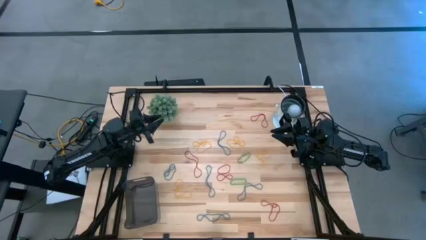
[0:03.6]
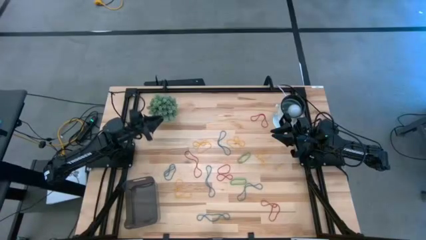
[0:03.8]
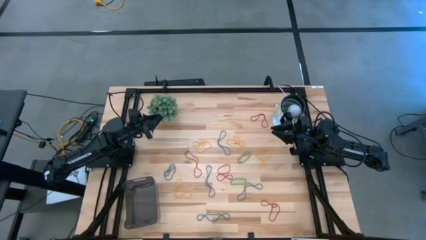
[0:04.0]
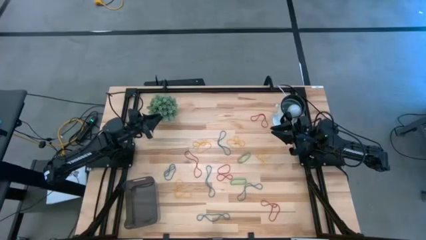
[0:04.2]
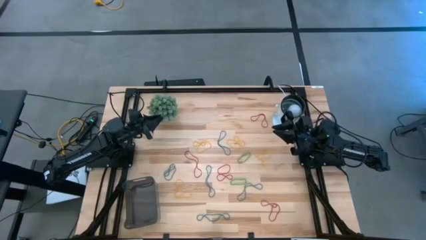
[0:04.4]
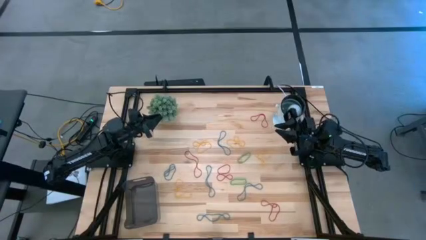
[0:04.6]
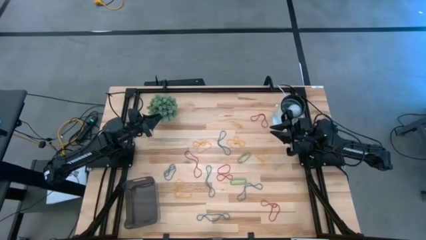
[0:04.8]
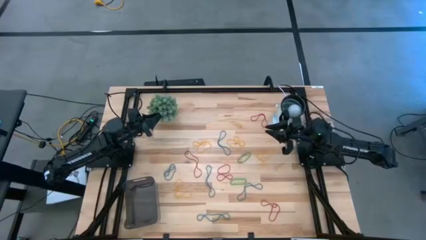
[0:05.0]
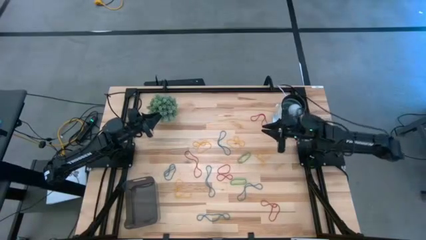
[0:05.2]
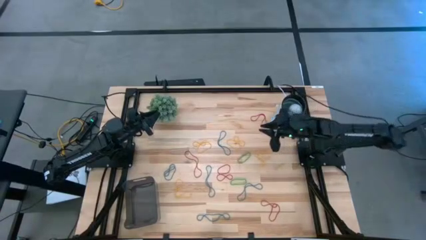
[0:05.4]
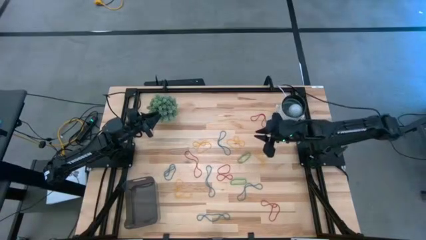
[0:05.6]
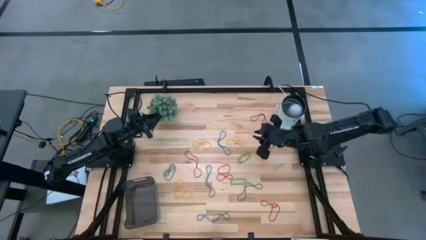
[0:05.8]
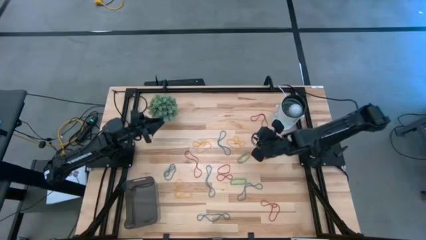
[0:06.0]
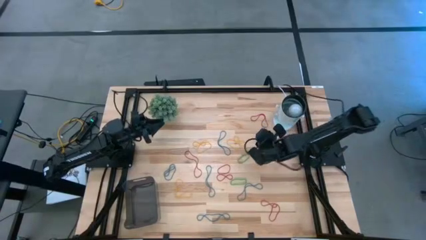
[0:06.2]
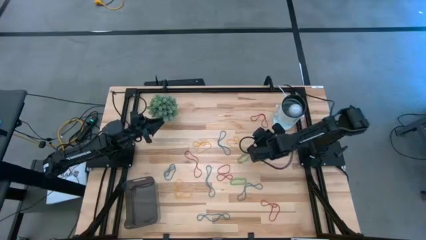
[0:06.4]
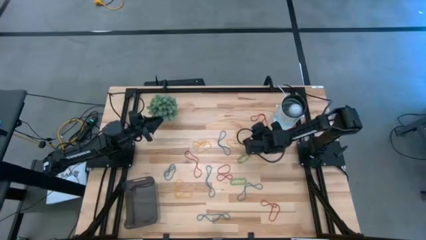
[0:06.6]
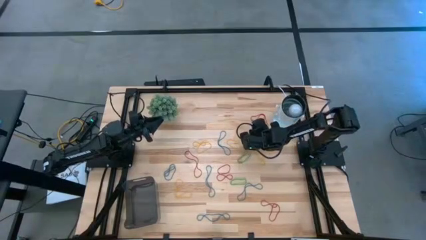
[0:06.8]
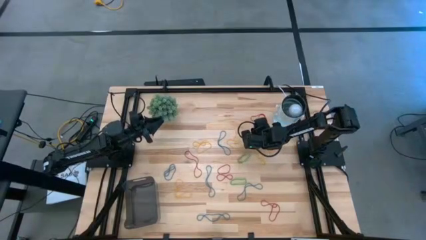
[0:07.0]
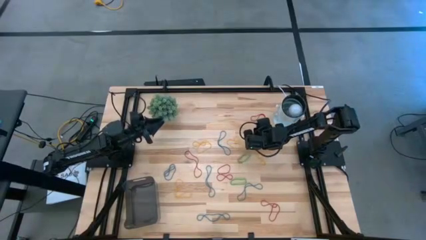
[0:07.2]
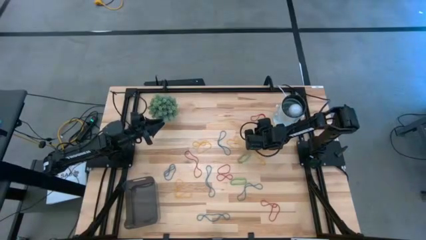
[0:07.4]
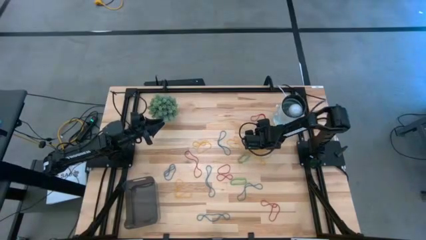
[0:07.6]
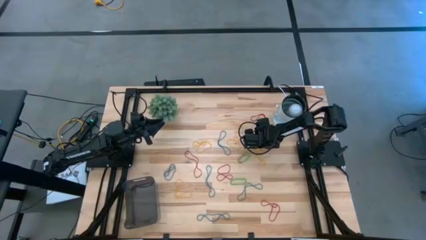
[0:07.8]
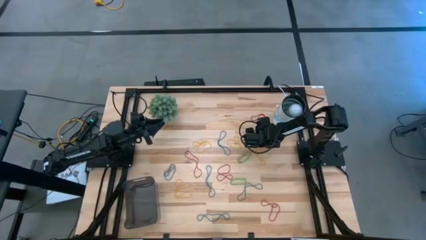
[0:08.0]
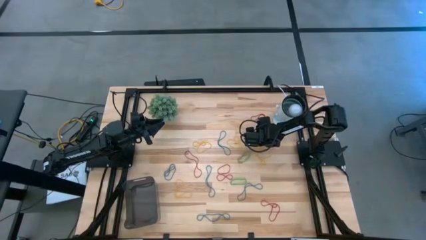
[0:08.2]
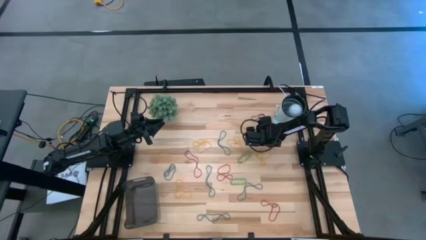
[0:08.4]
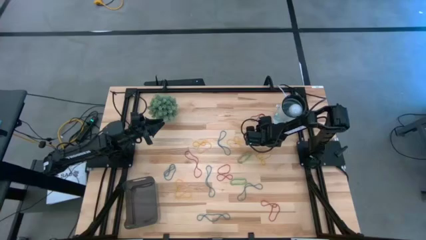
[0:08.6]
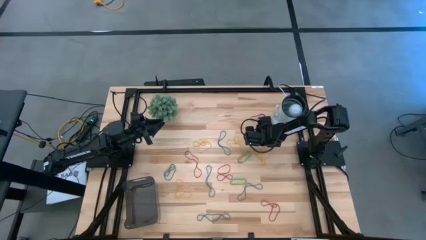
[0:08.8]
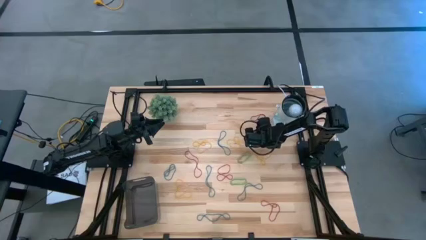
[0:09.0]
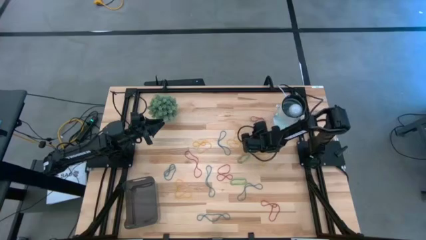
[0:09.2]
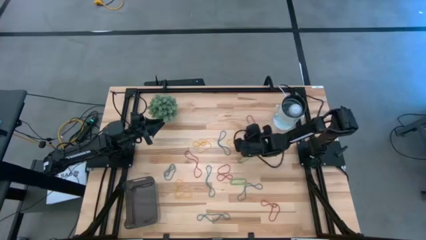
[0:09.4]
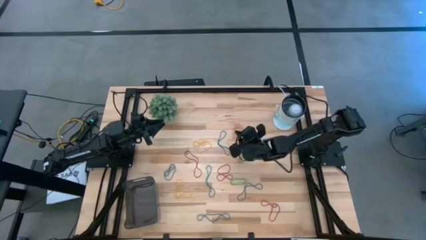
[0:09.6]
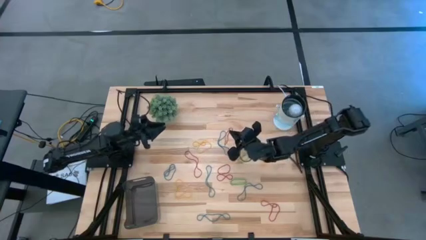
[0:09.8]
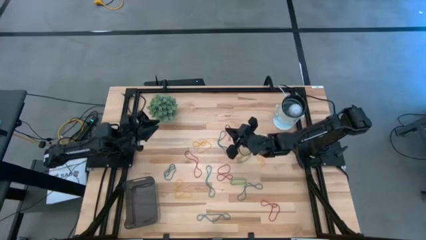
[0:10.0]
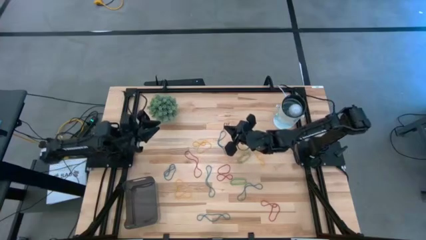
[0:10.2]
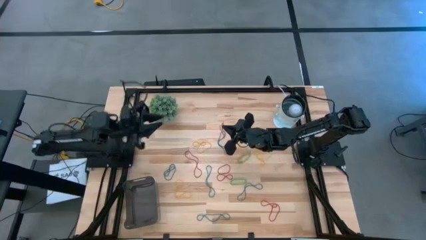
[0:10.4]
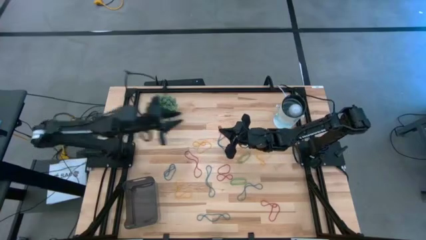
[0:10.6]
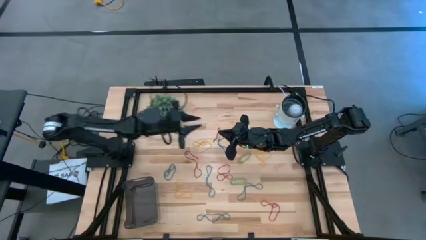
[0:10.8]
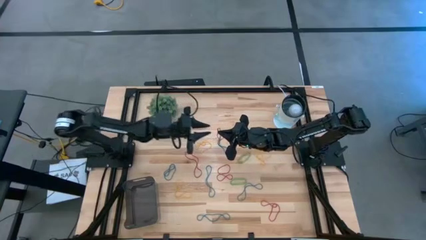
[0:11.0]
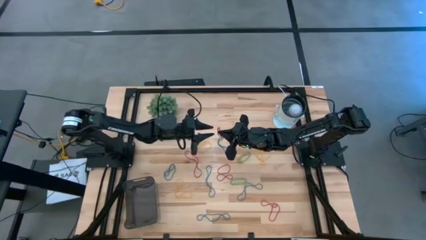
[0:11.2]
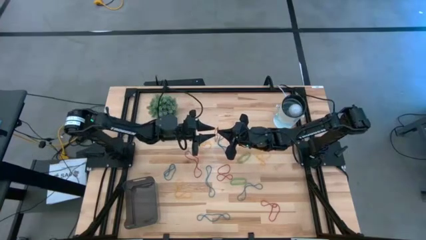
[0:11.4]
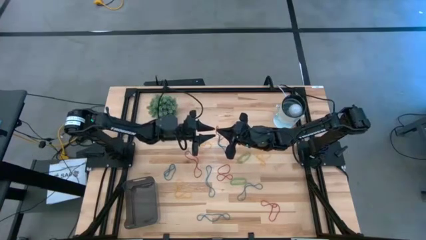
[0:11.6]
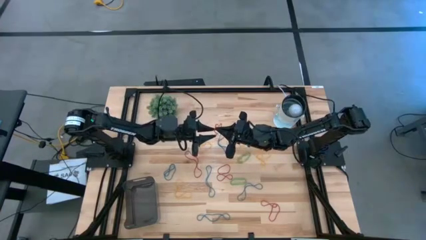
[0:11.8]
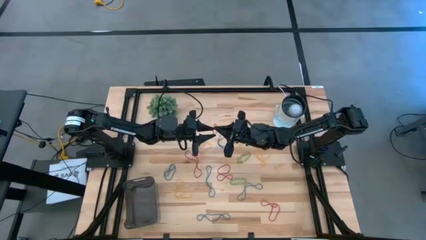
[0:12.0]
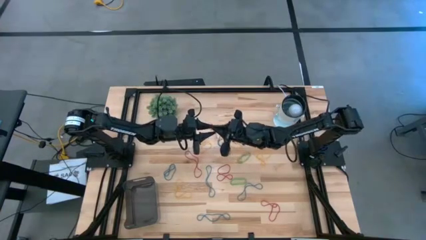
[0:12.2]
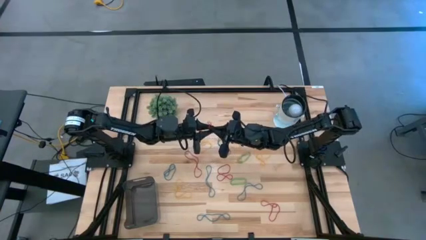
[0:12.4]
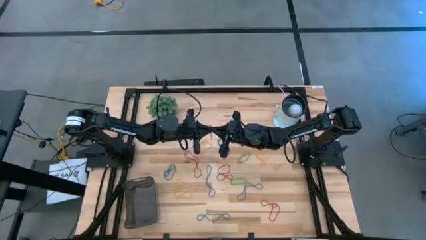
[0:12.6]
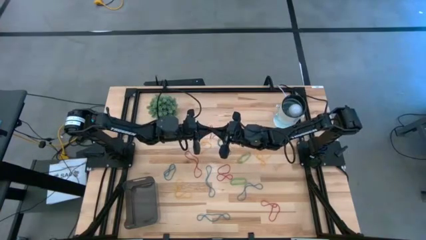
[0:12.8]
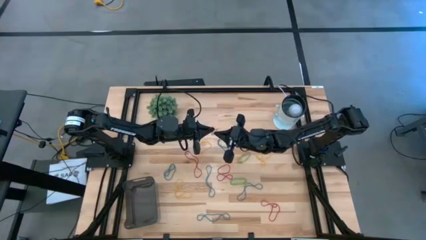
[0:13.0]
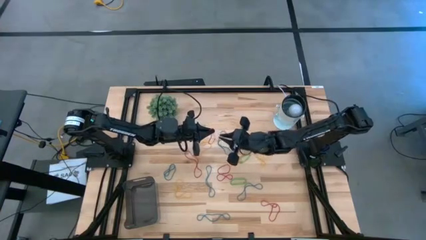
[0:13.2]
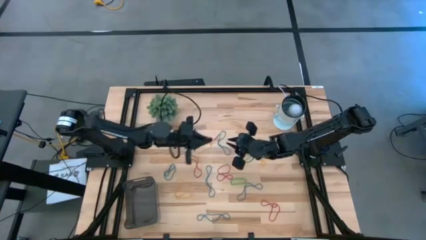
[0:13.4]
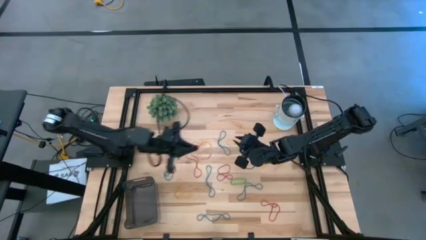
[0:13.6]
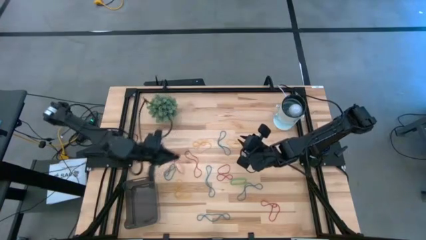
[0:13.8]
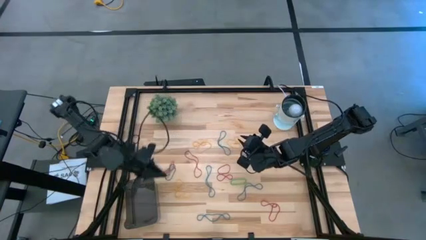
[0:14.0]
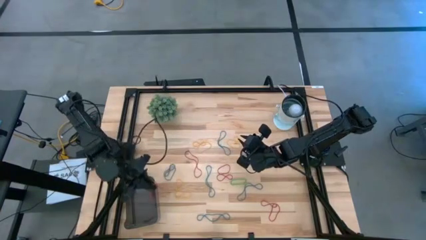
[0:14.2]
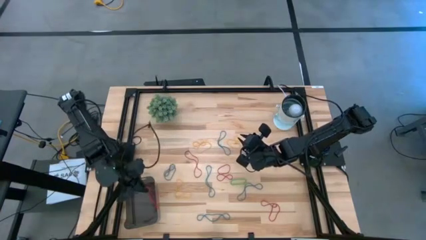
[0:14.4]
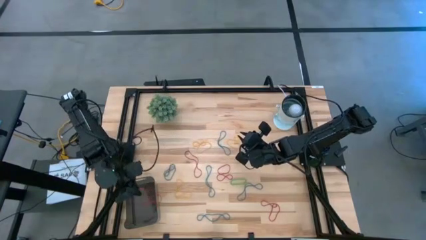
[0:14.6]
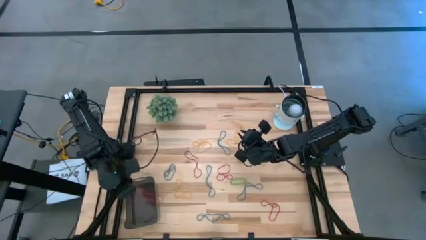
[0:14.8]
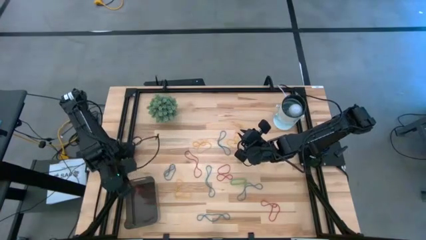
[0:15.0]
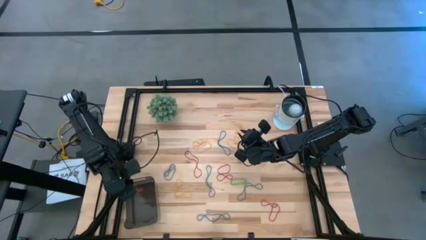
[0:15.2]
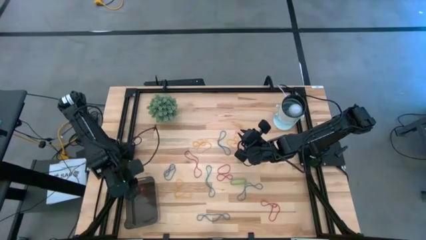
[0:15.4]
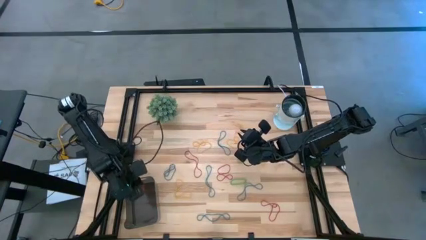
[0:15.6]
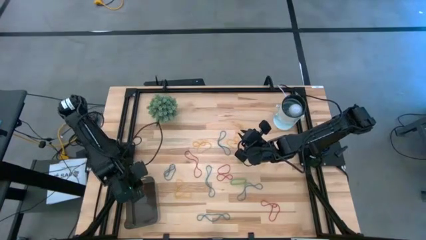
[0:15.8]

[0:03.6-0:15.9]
Task: Pick and place items into bin
Put red rubber band into the black bin

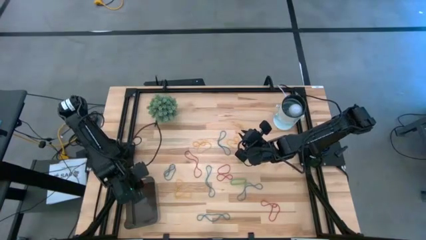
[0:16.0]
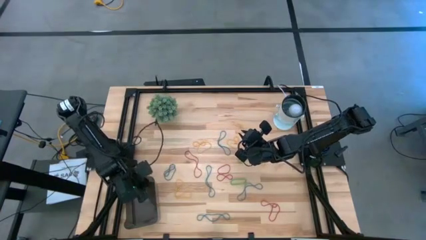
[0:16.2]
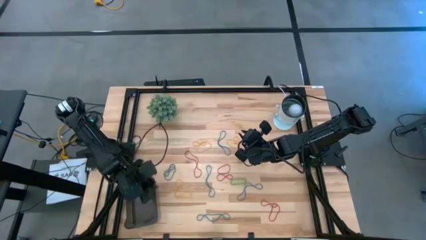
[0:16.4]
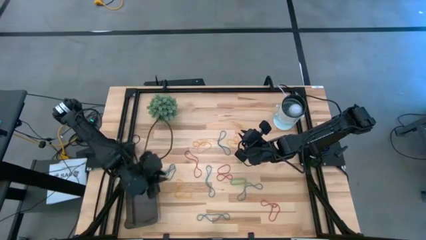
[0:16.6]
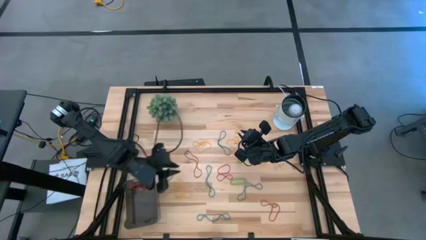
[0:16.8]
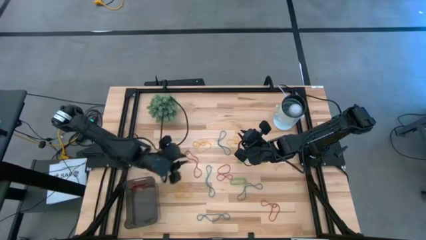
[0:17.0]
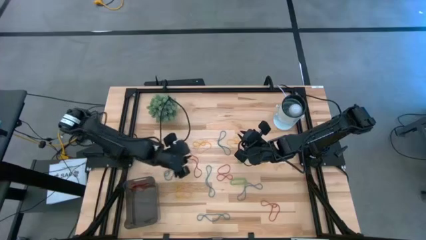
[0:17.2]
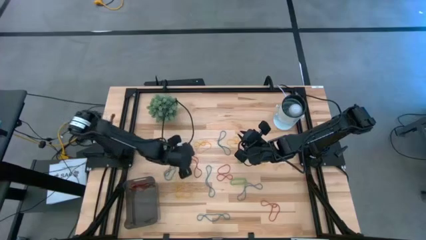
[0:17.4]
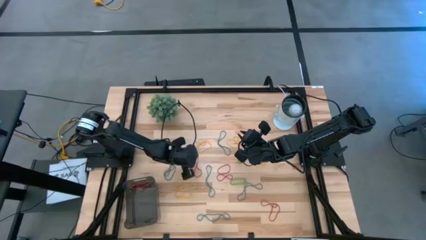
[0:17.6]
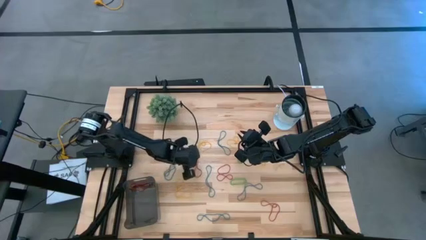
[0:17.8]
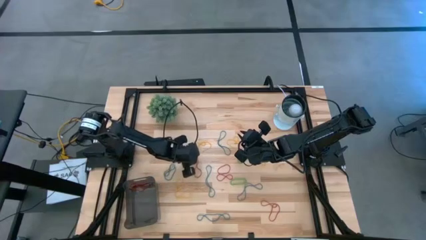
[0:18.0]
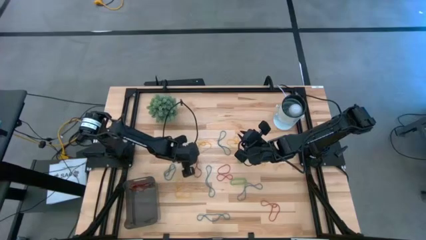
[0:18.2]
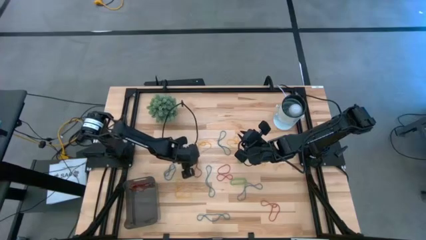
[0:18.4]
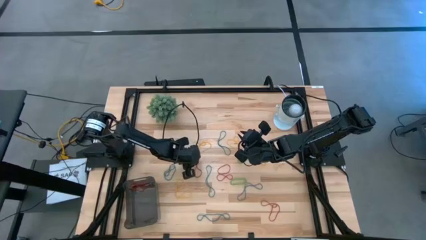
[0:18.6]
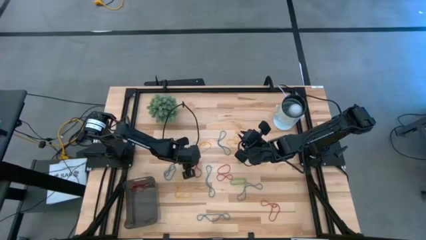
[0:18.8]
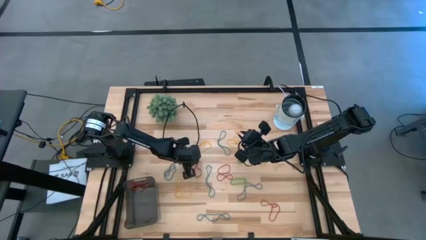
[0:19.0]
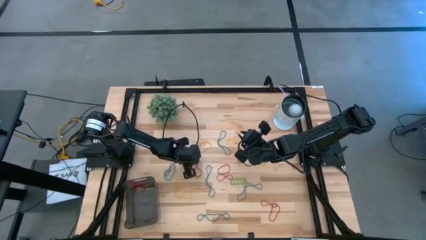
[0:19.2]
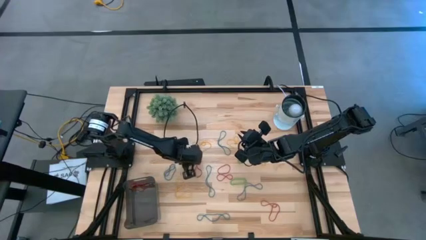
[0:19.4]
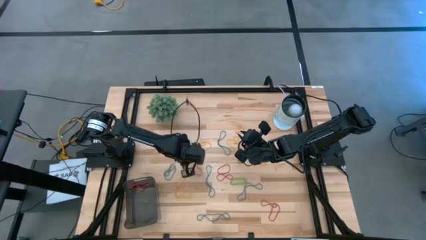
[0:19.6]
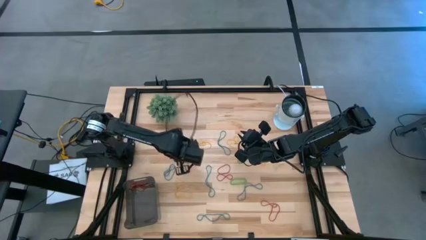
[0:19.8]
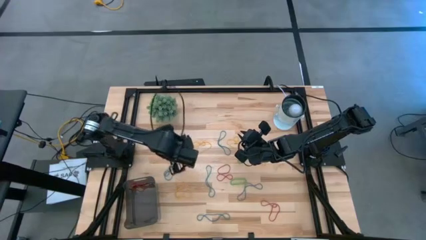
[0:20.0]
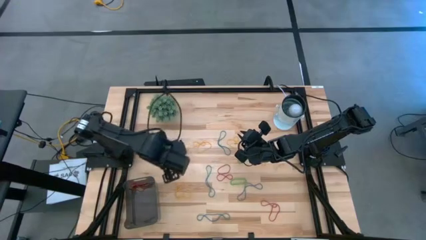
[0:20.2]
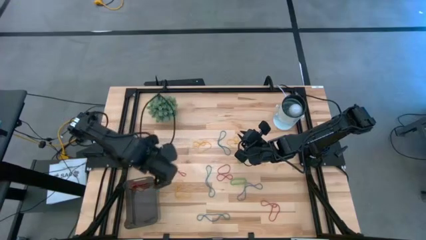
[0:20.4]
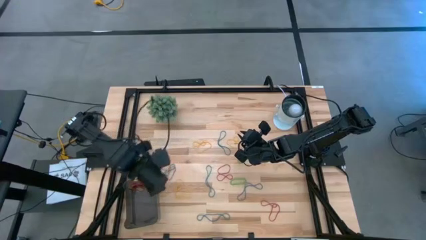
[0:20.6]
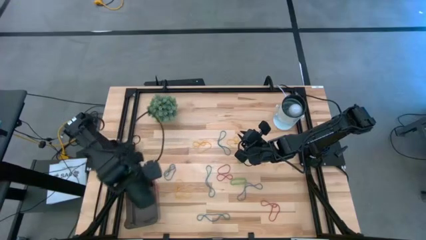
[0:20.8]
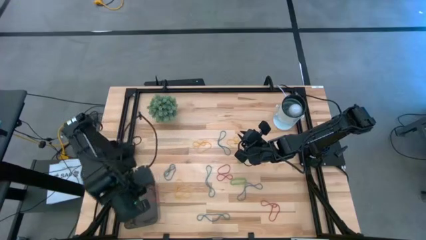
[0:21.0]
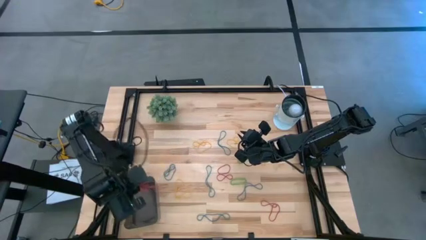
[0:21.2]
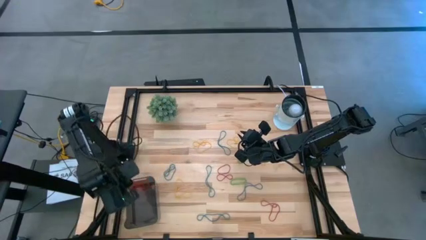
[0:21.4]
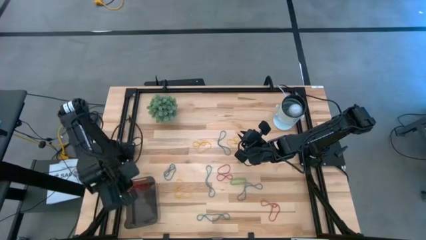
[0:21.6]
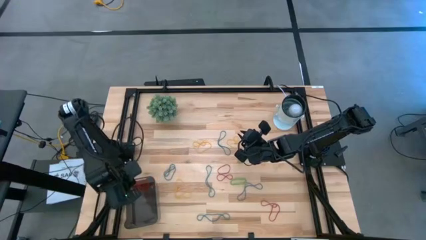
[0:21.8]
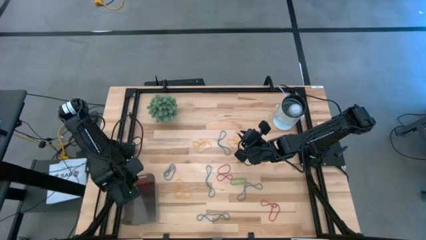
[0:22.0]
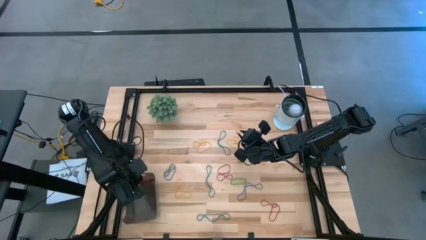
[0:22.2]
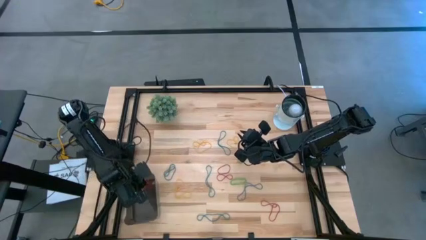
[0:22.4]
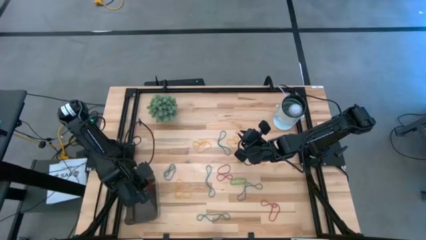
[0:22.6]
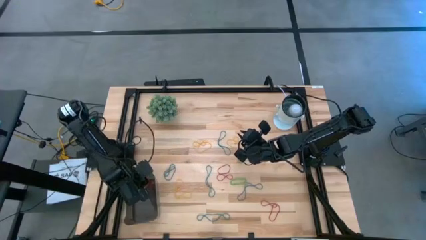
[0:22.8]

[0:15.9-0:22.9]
Put red rubber band into the black bin
